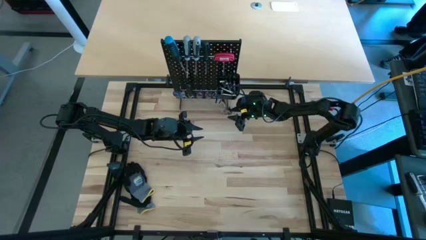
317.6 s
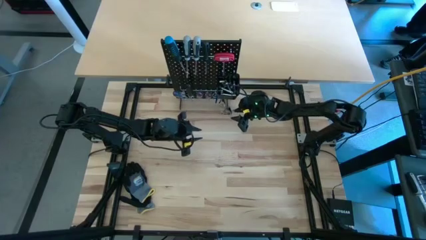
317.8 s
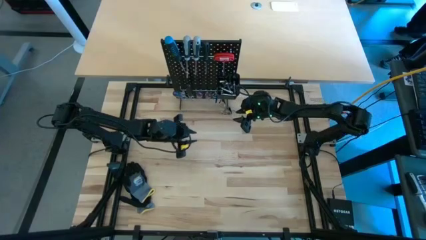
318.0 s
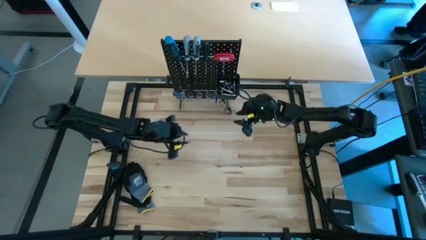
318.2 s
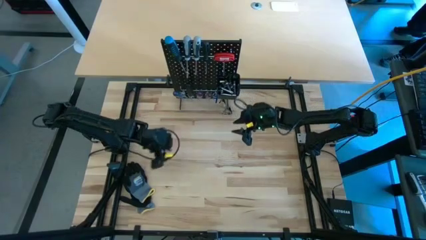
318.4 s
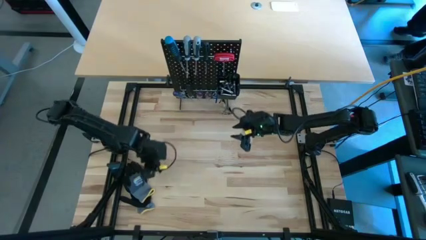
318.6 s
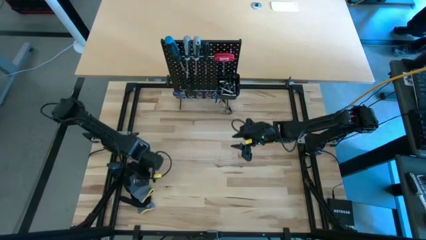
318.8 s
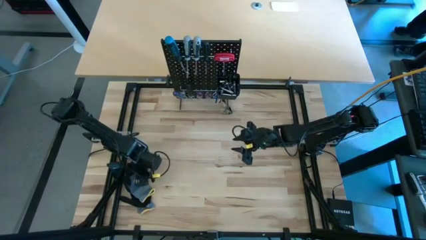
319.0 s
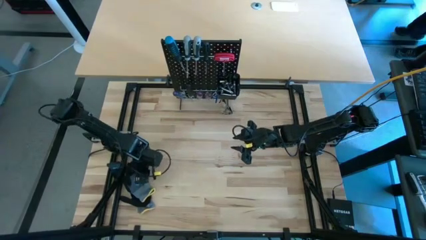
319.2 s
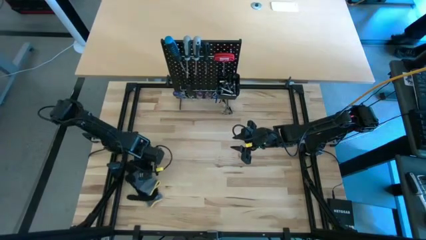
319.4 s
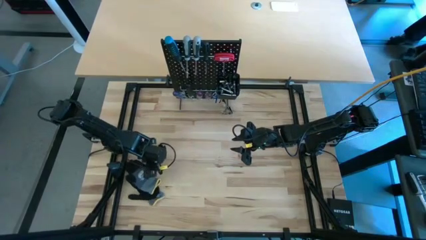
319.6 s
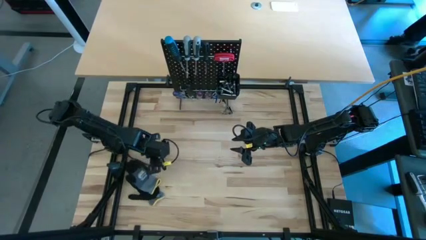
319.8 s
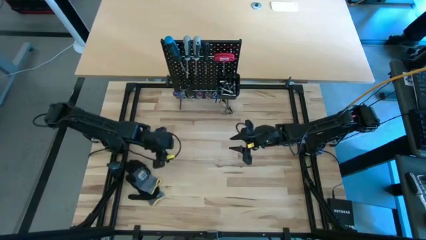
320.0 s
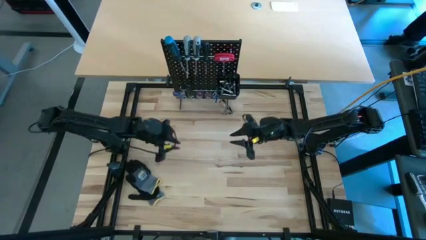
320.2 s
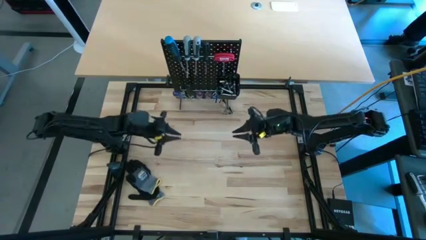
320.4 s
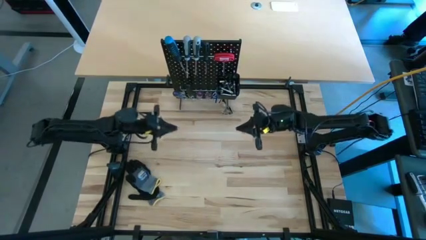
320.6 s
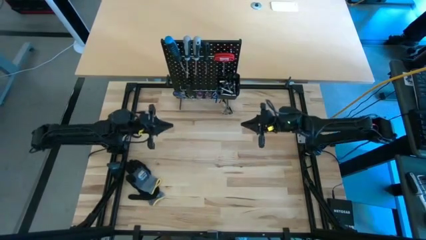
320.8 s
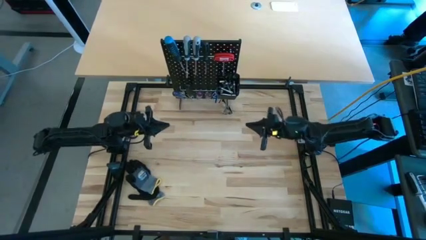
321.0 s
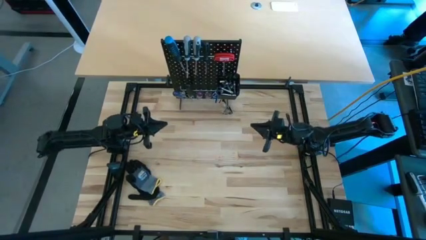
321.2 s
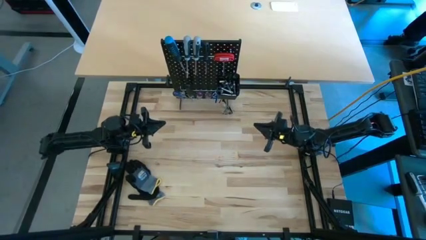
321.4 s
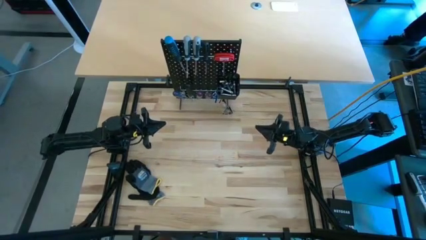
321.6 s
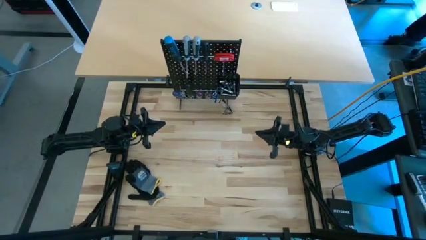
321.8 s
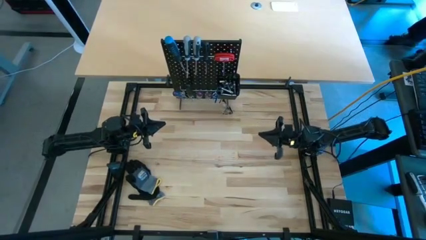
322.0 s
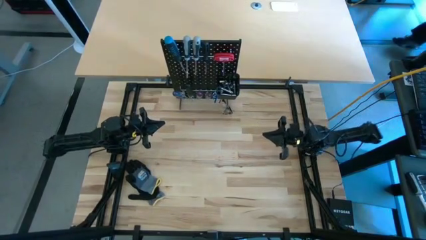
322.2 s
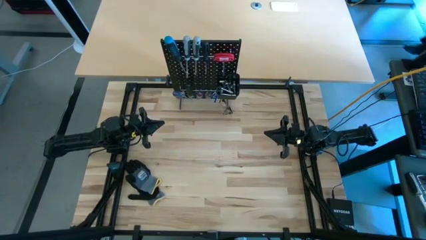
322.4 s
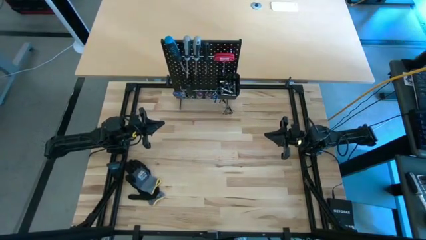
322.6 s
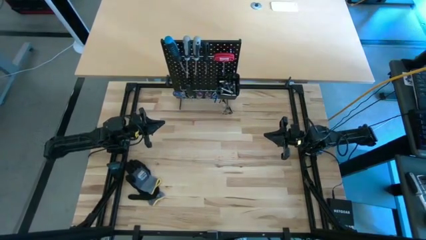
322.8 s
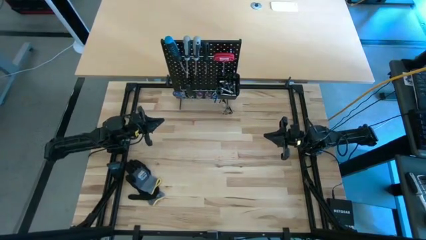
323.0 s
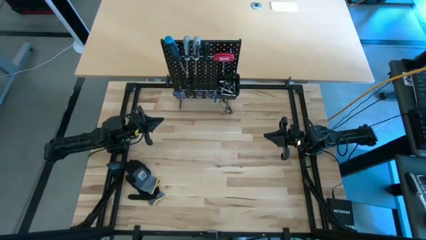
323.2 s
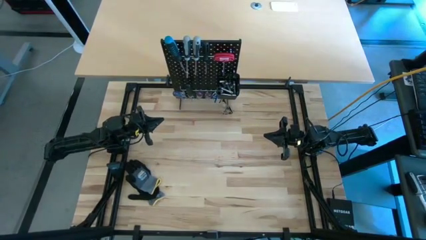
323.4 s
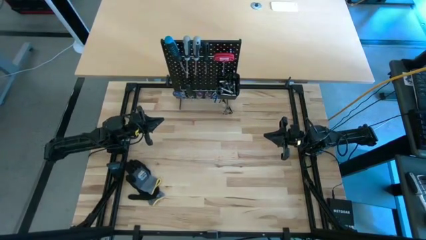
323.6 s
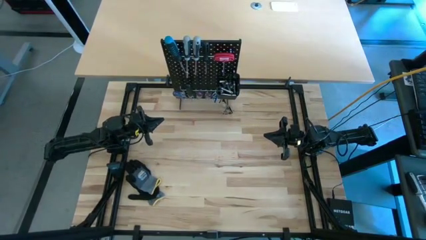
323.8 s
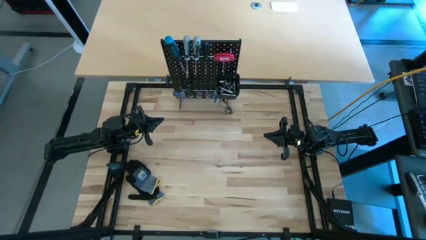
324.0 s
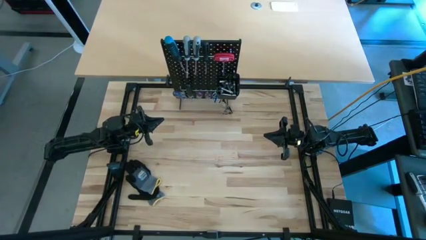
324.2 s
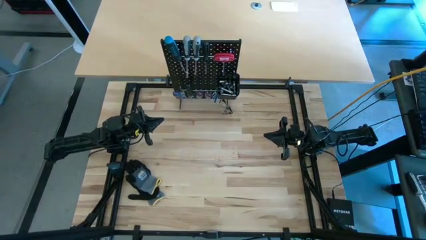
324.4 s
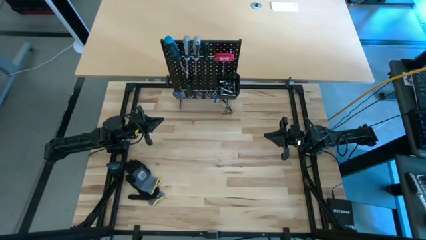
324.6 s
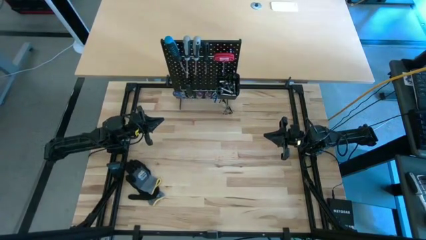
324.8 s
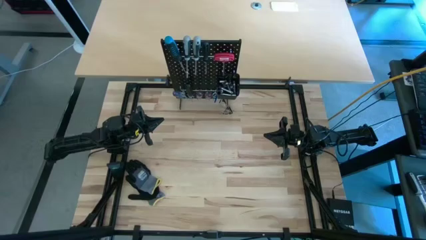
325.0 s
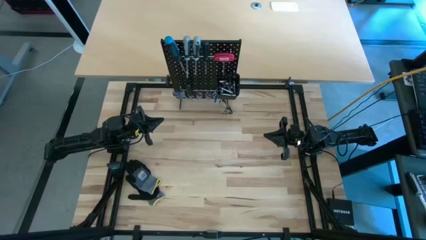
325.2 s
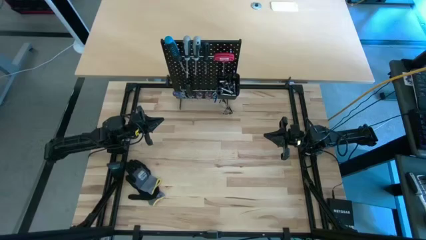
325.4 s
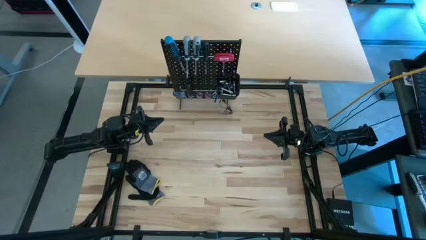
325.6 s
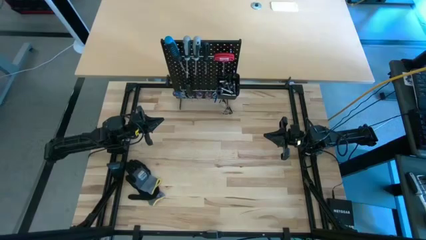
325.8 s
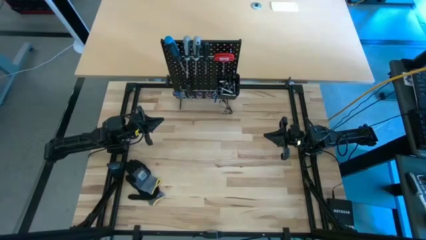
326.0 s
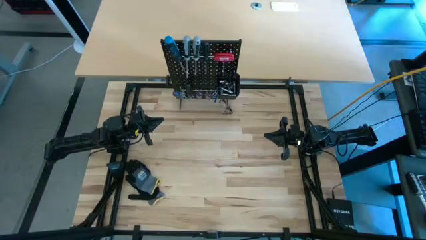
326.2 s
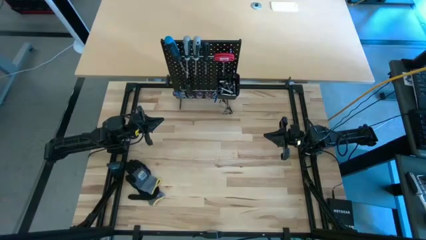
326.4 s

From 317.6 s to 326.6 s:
Task: Hang tools onto peg board
Return to Home Position

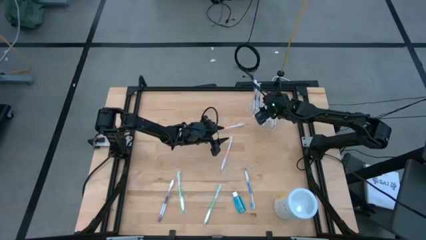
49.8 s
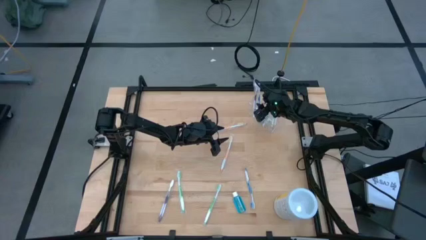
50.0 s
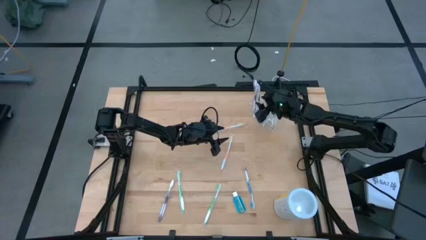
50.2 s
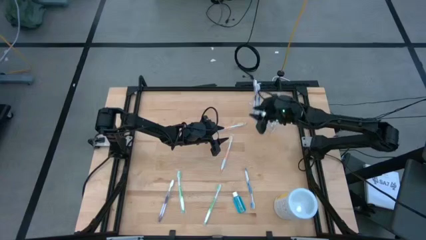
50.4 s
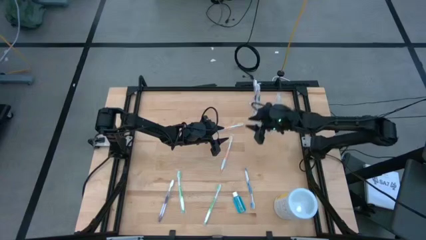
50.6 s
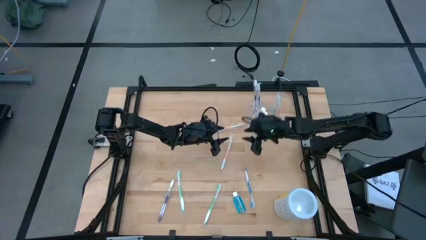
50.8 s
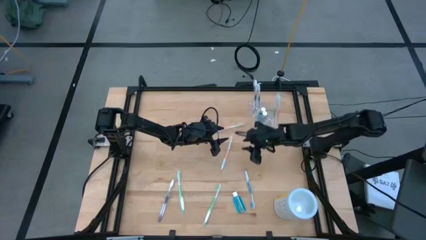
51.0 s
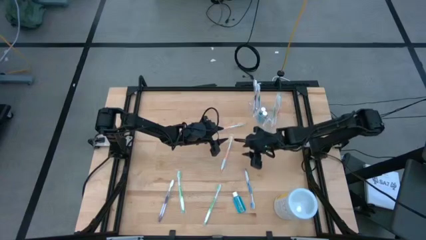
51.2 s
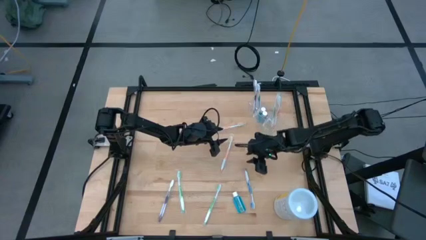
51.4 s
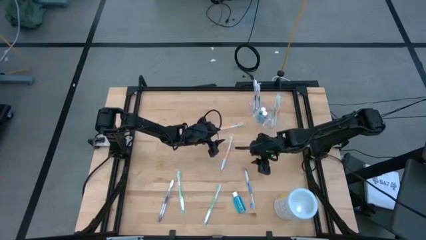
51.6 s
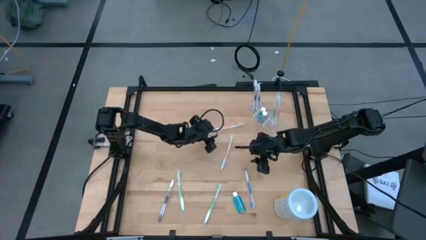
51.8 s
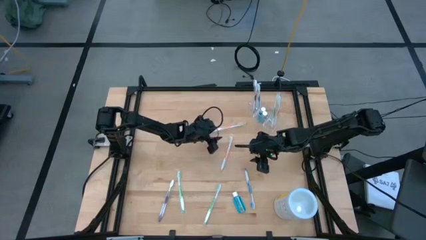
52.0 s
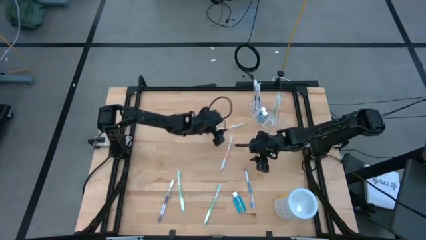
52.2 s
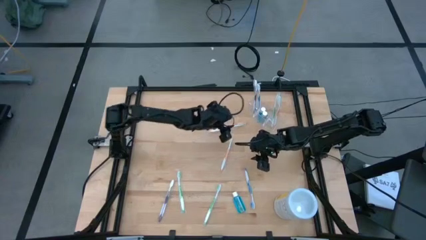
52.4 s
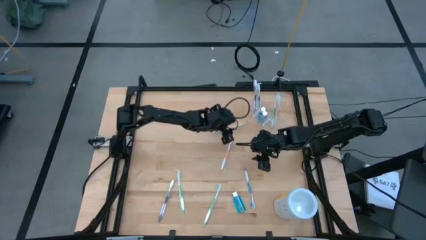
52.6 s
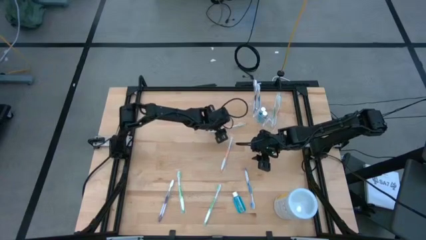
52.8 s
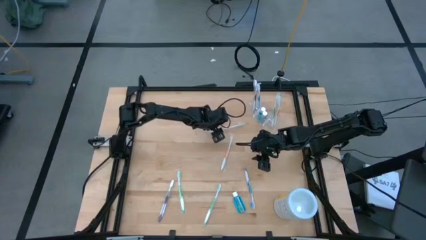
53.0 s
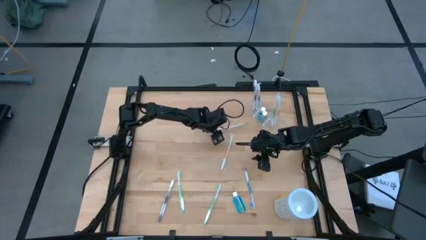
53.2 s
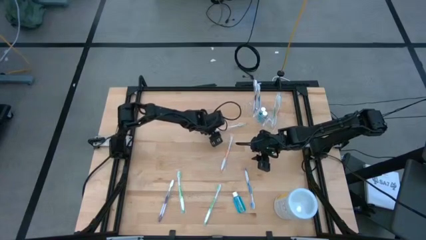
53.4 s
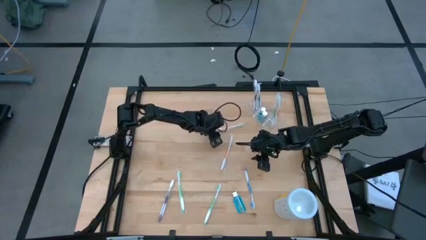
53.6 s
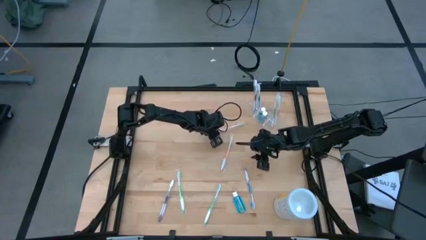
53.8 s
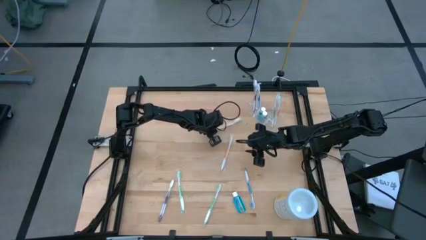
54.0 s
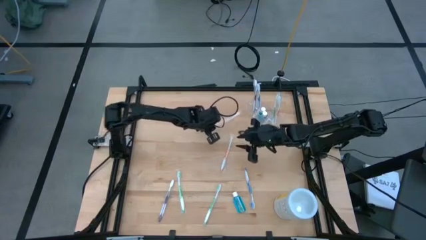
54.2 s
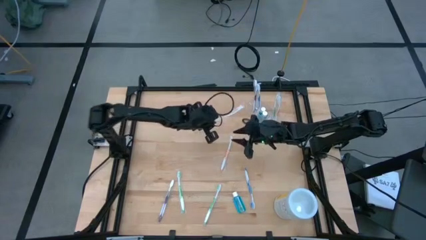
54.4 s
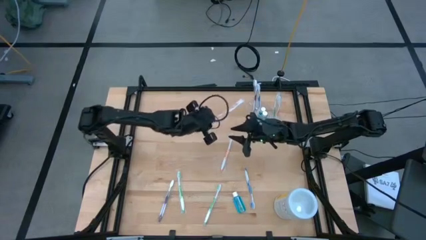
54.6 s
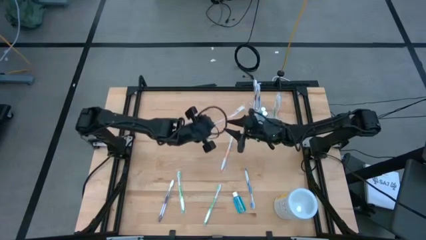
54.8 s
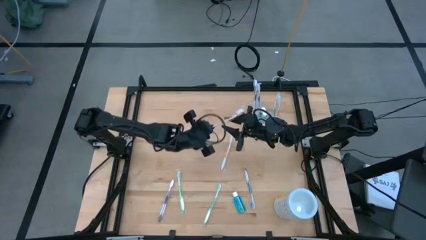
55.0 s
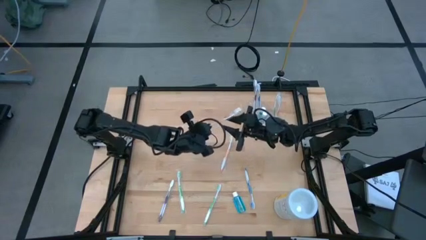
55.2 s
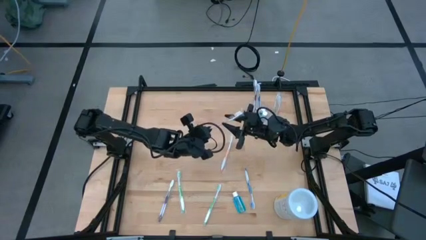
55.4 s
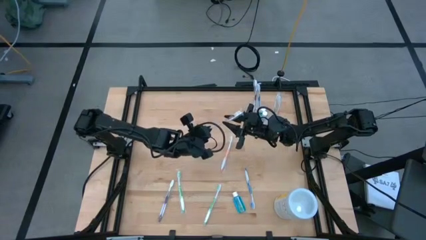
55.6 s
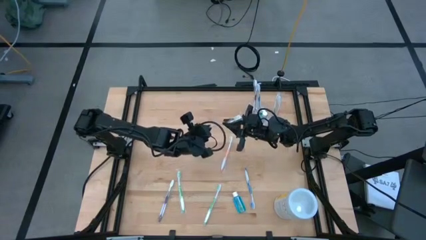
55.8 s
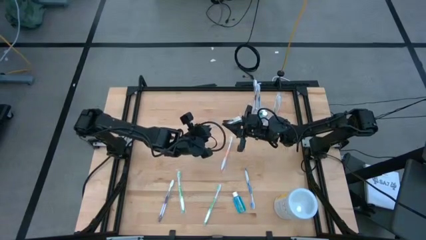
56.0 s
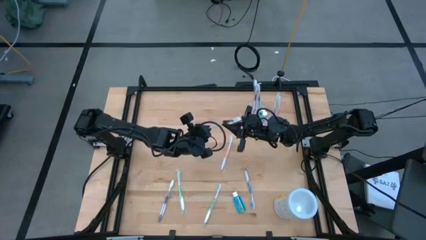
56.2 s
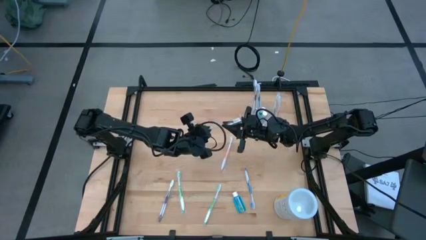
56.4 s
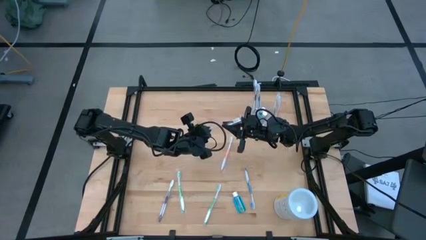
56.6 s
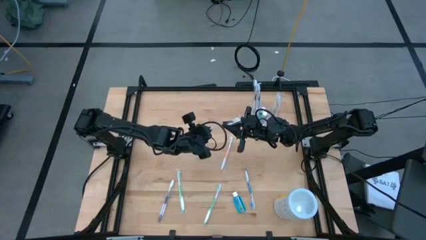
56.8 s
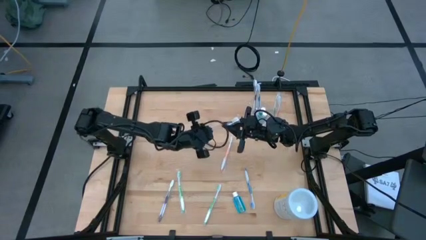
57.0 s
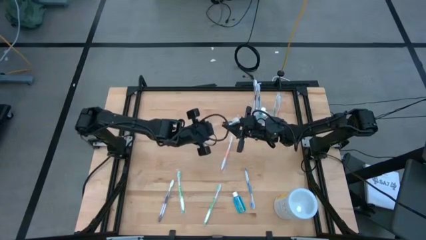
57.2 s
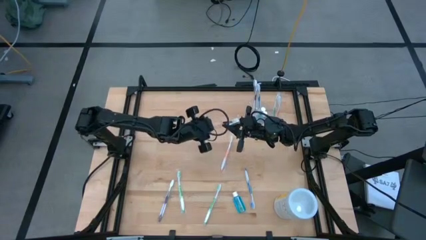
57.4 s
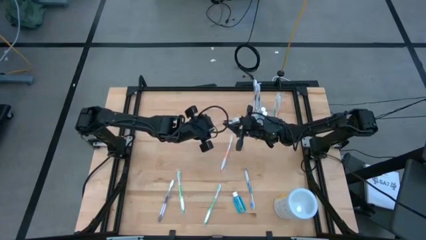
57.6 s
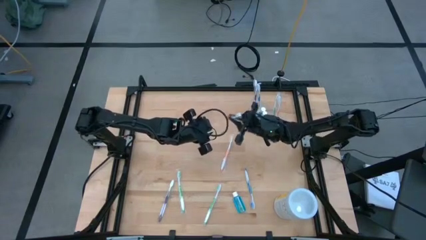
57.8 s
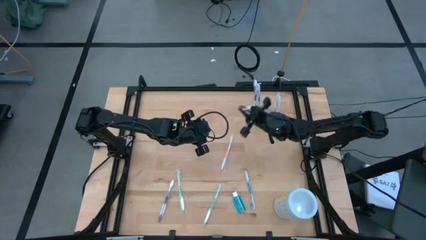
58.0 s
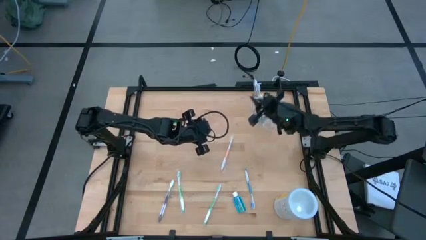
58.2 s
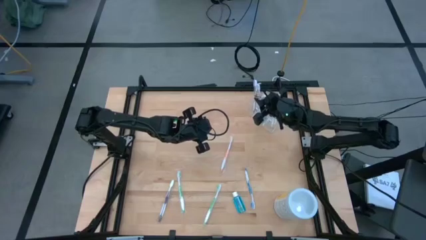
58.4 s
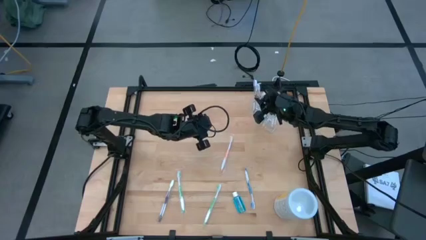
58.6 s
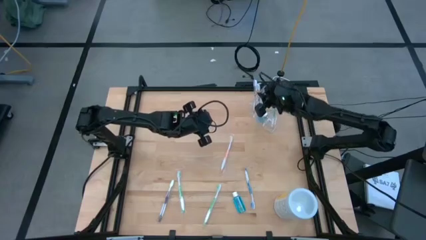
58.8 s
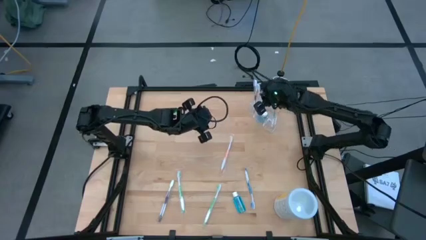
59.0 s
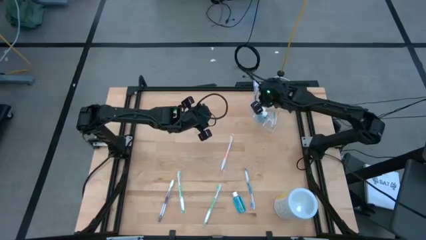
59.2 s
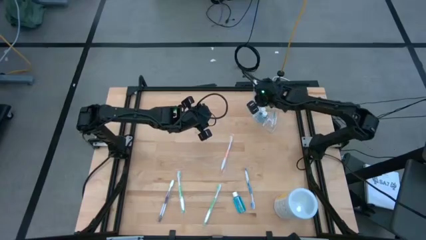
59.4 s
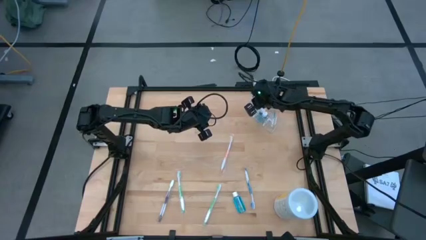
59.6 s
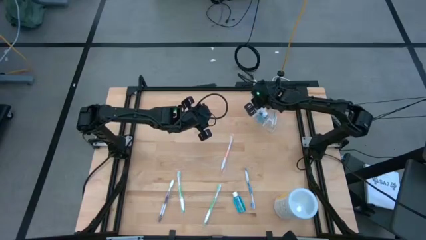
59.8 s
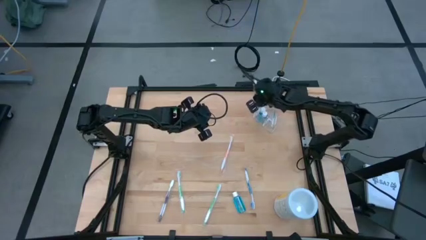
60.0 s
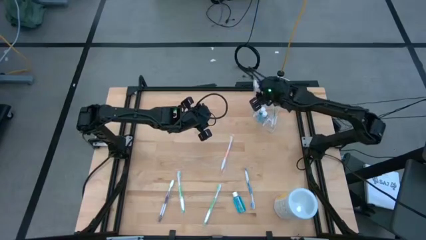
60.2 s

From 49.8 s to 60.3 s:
Task: Pick & Place toothbrushing station
Put the top orange toothbrush into the transparent organizer
